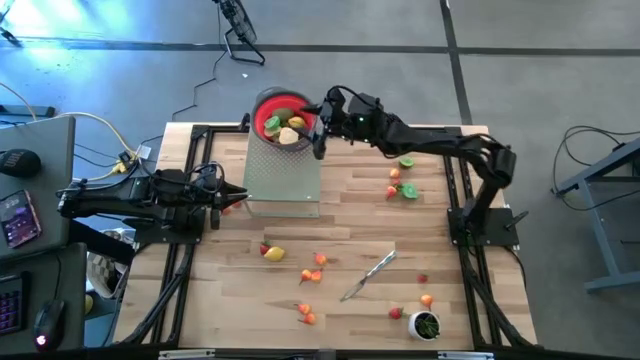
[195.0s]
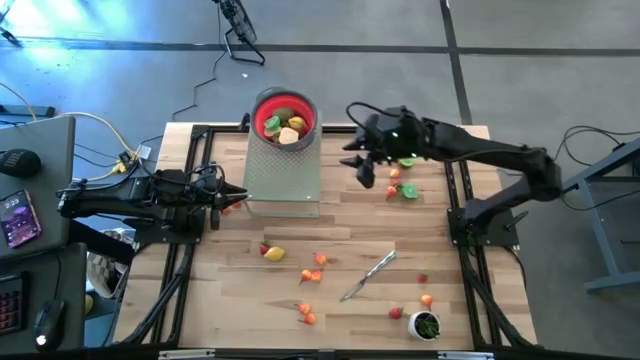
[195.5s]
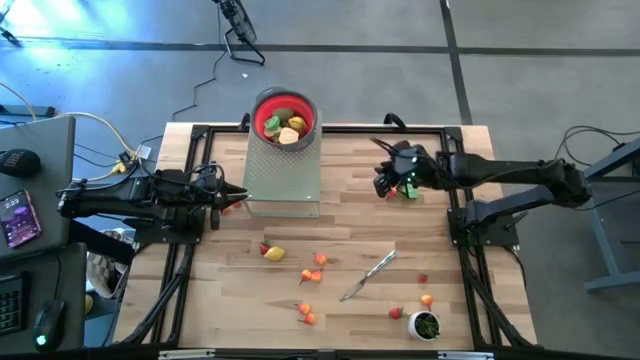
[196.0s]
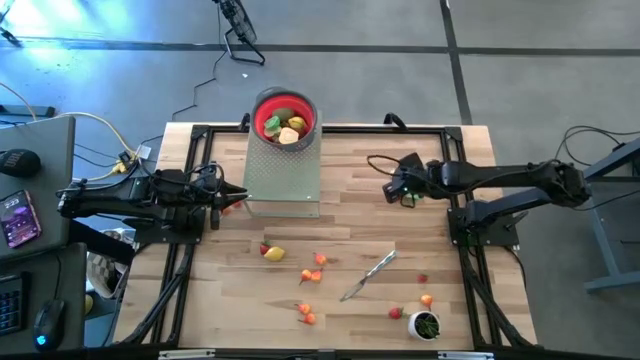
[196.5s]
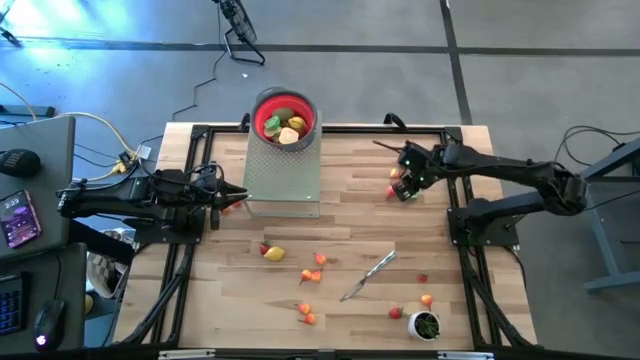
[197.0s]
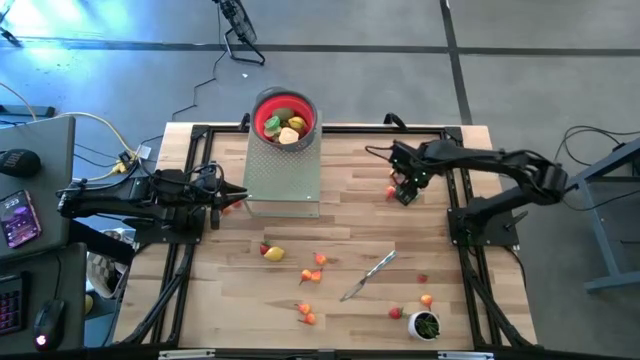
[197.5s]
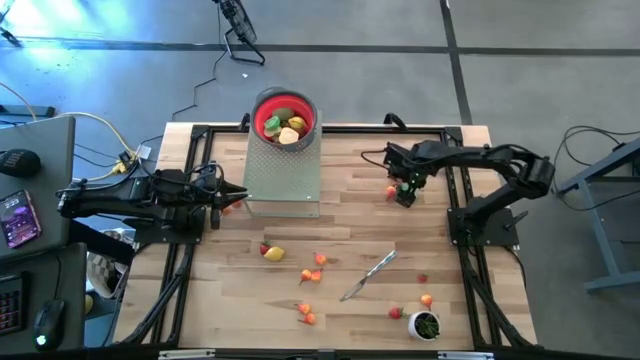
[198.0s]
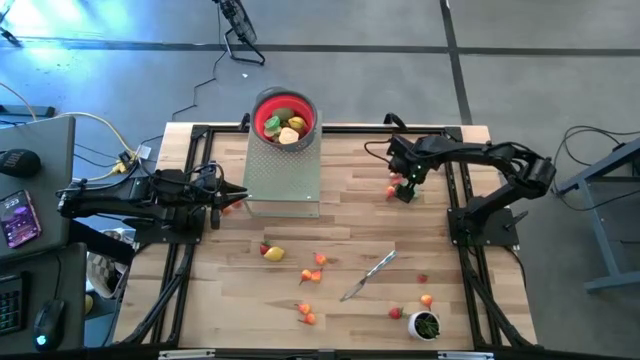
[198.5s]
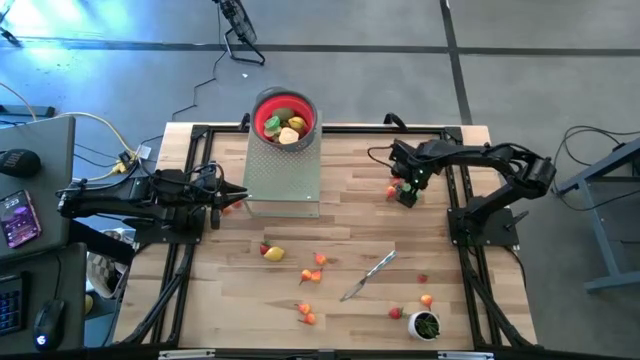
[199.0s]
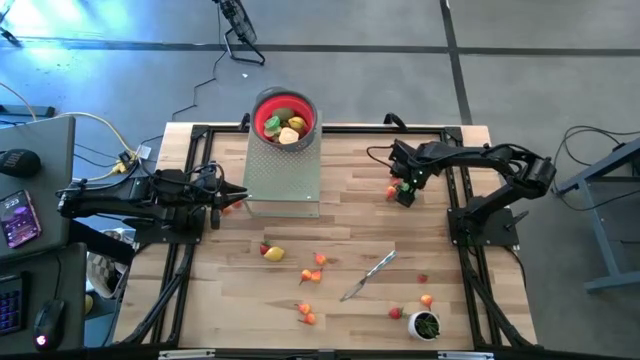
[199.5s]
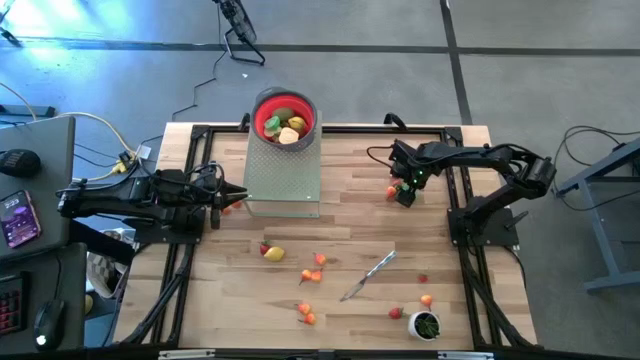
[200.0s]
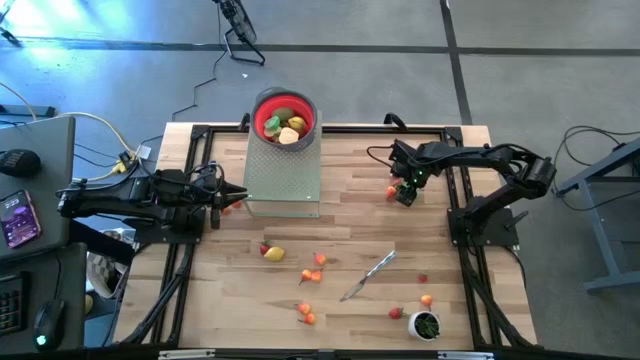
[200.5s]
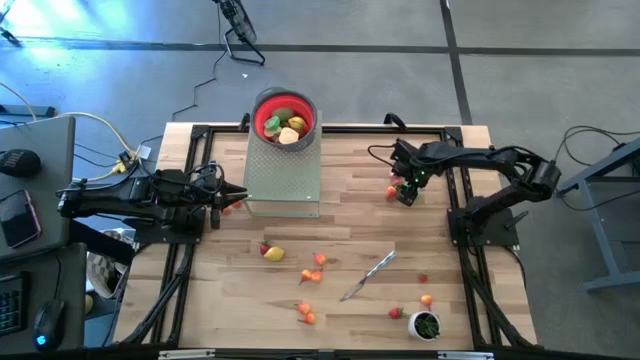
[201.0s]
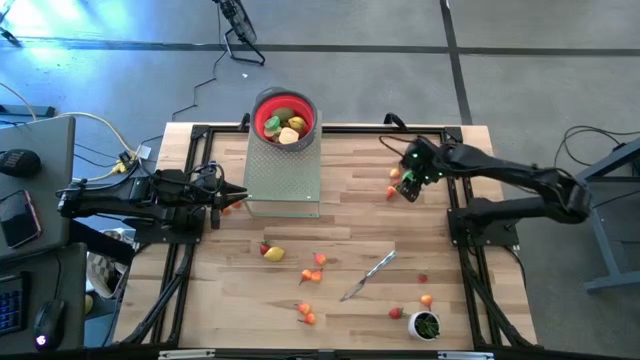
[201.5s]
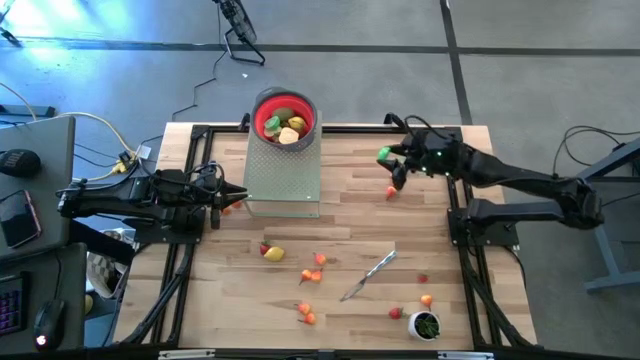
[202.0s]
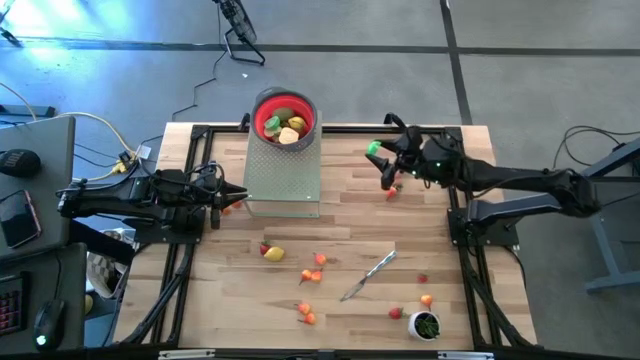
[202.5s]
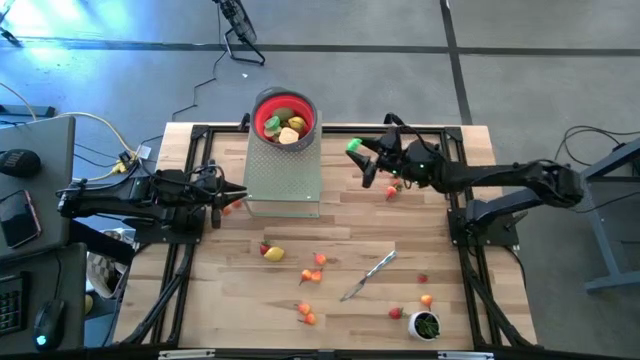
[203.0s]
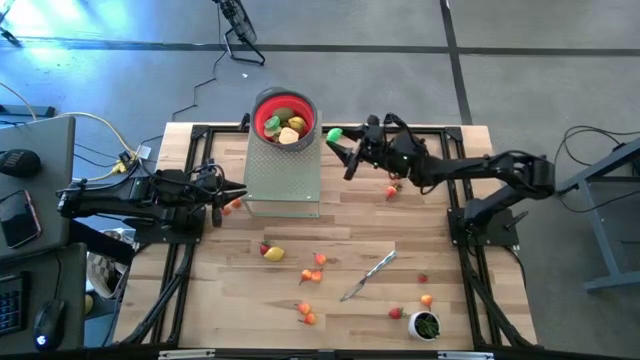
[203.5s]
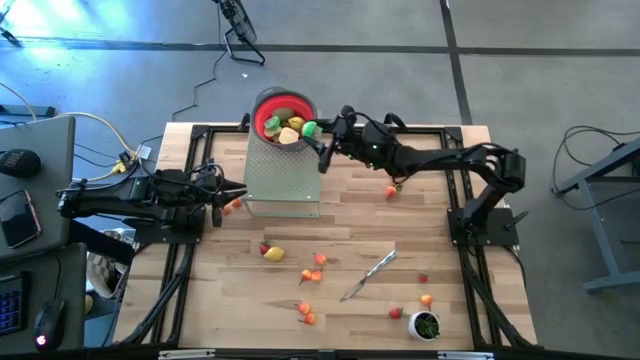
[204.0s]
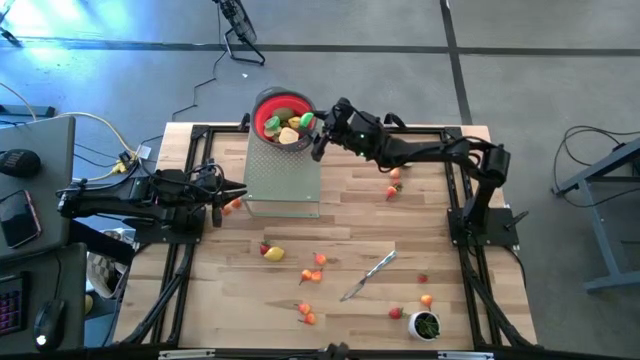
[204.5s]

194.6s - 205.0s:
Task: Pick & Place Fruit
Put the green half pear into the red strainer on the shelf

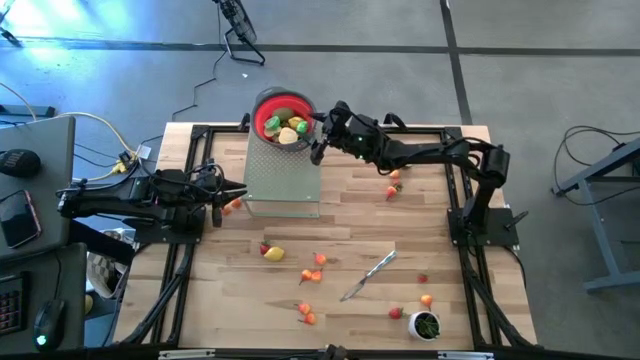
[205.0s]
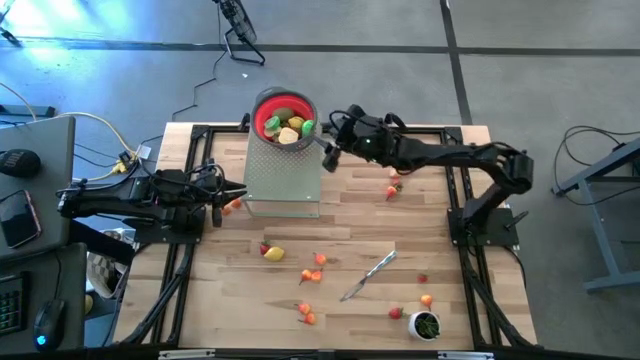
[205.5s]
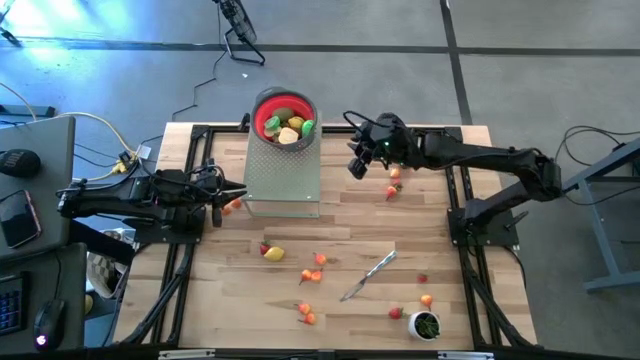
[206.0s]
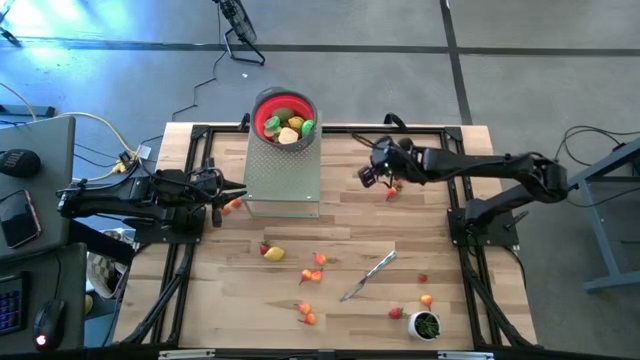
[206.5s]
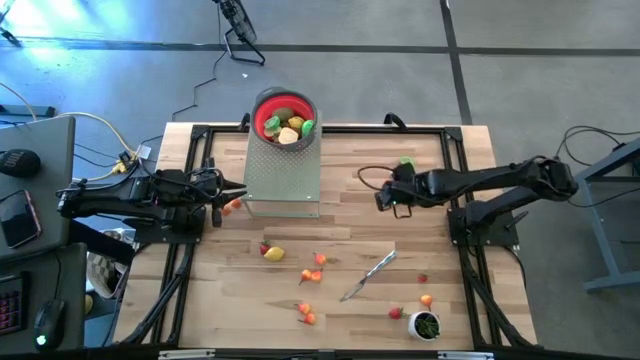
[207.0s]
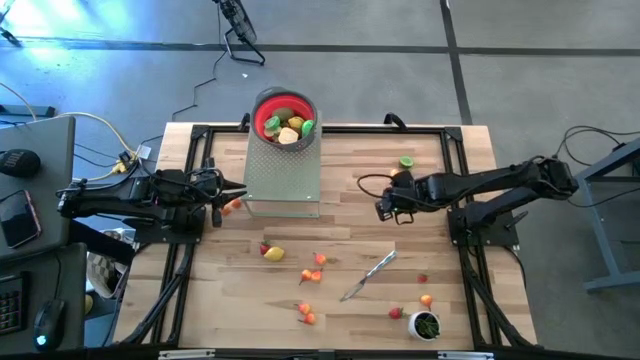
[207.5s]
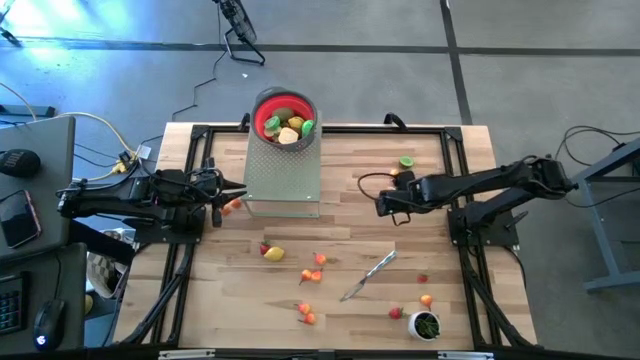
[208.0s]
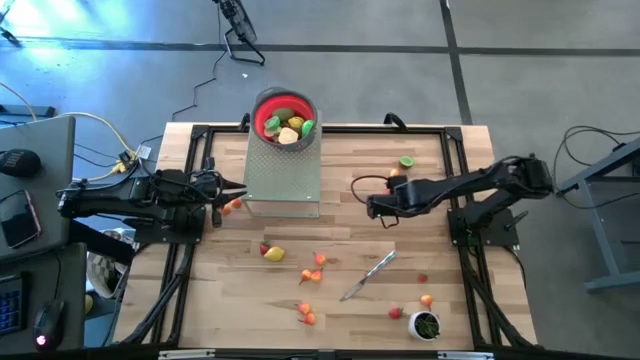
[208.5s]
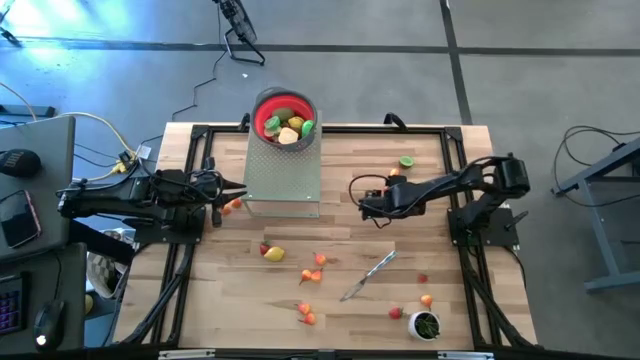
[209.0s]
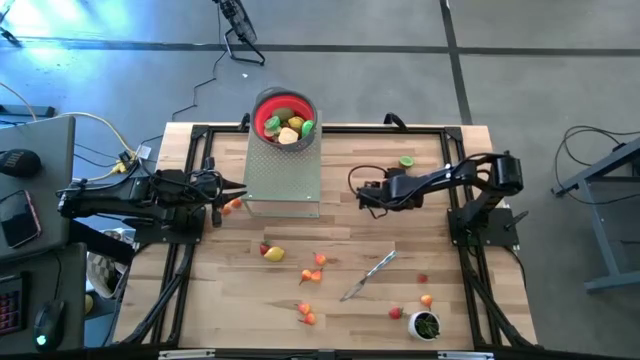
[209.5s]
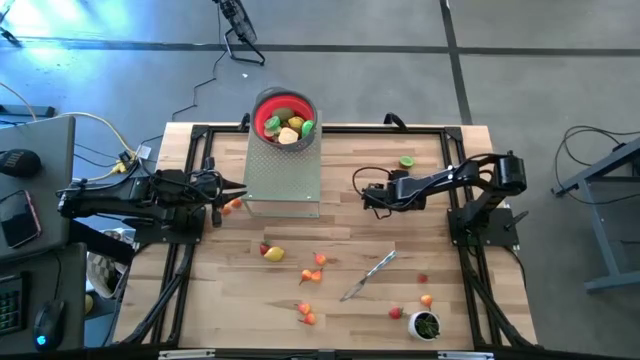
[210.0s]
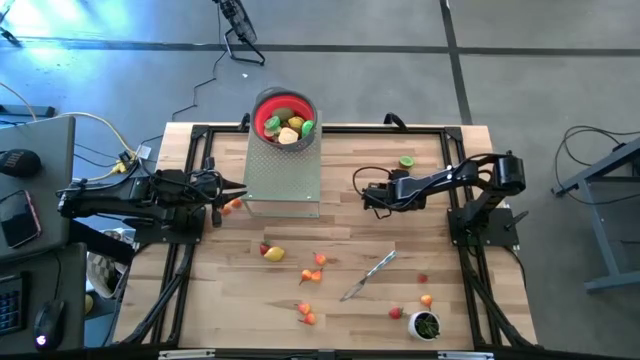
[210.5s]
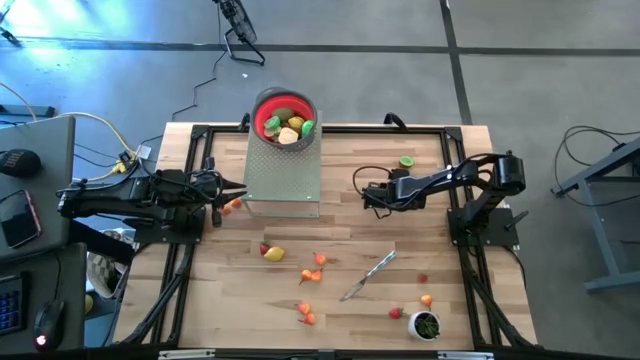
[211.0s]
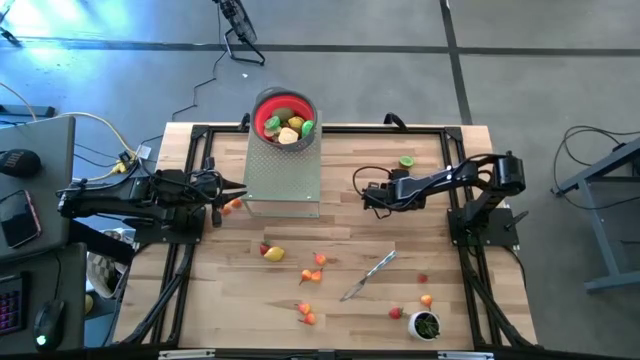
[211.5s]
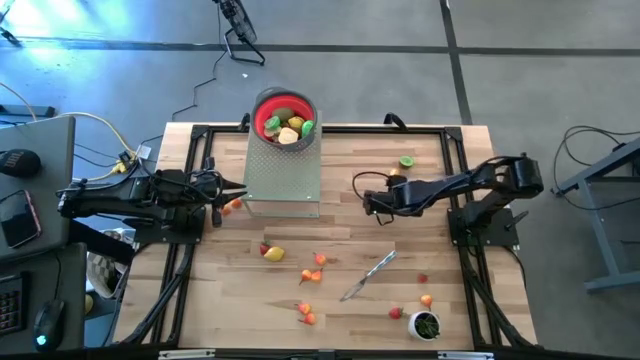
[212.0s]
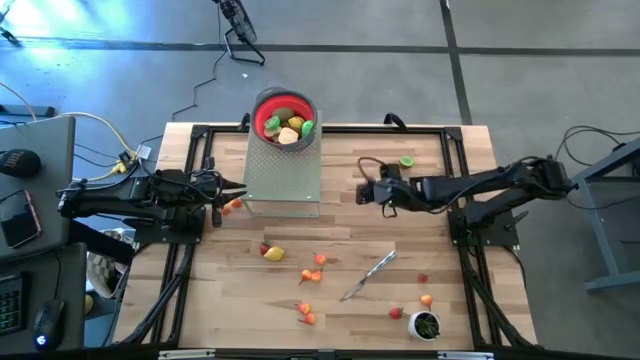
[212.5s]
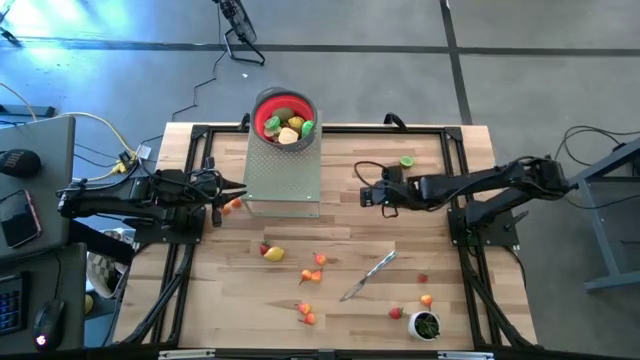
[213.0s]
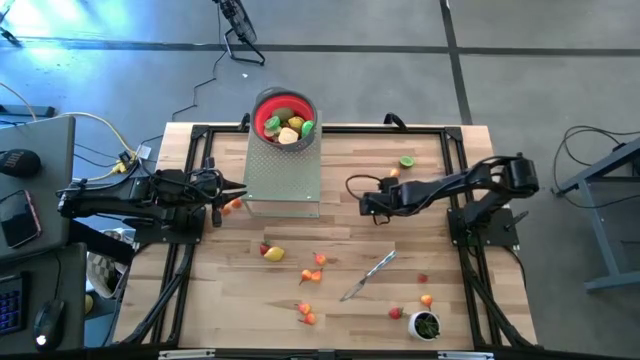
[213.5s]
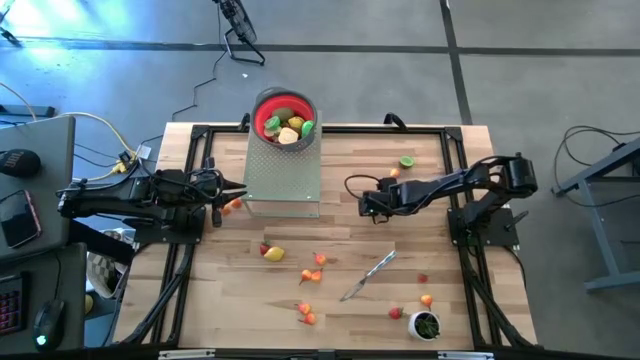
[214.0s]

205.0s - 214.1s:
Put the orange pear into the red strainer on the shelf

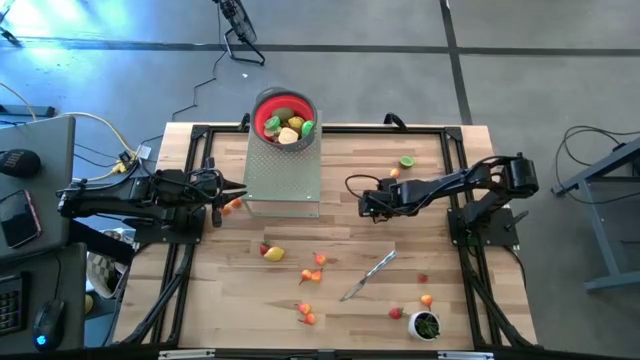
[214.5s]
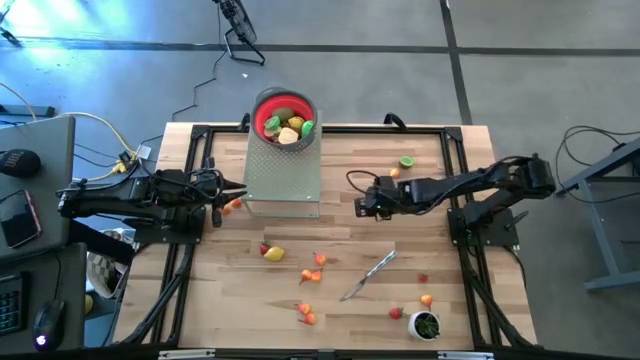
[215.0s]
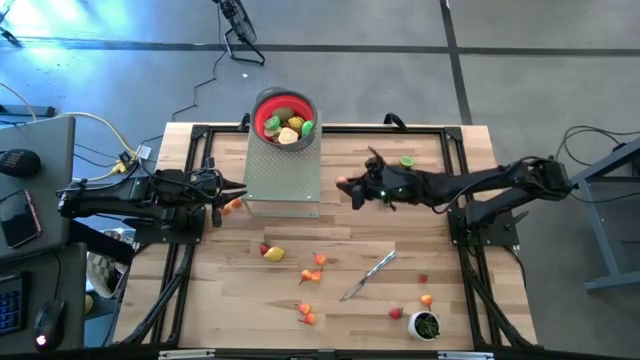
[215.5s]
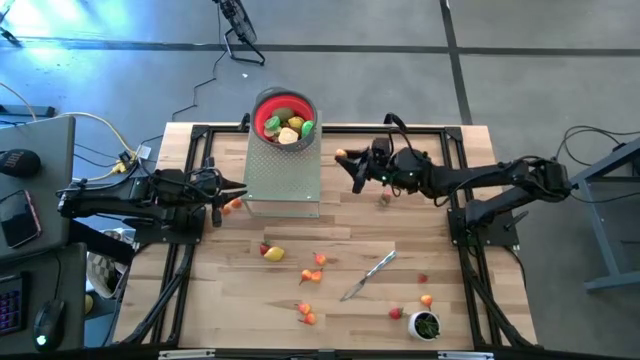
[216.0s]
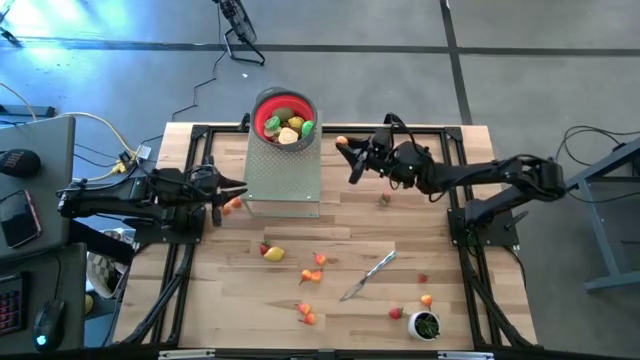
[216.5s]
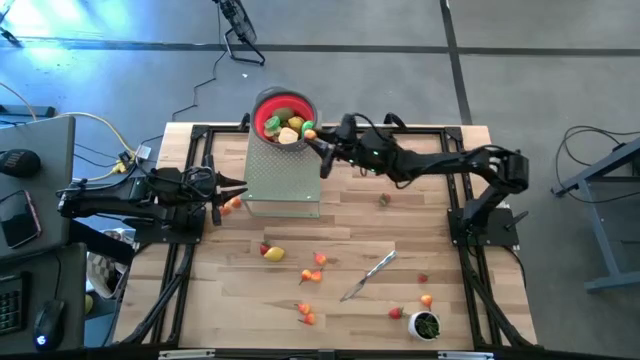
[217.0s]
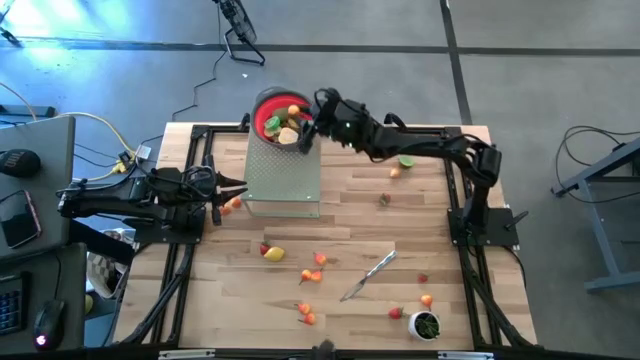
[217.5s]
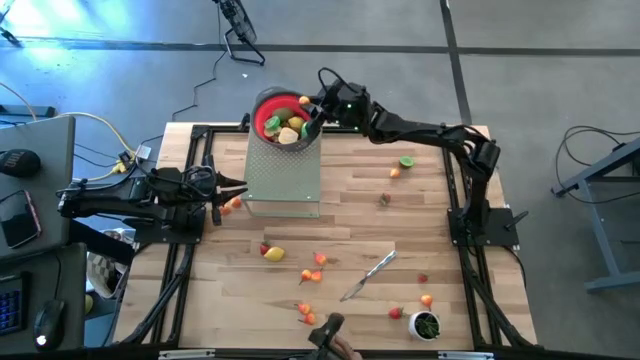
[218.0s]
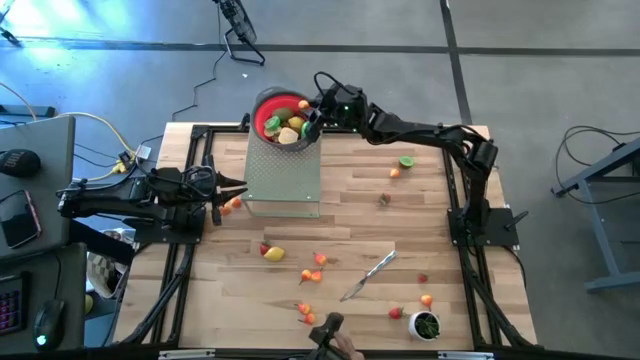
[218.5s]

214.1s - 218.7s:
Put the orange pear into the red strainer on the shelf
